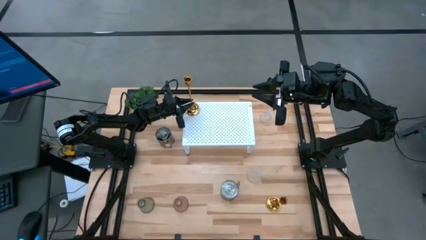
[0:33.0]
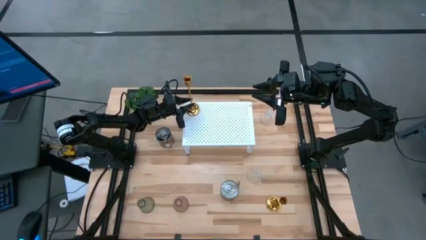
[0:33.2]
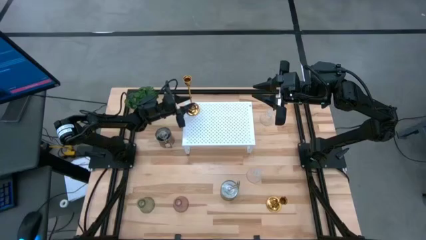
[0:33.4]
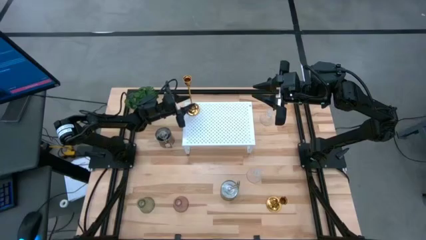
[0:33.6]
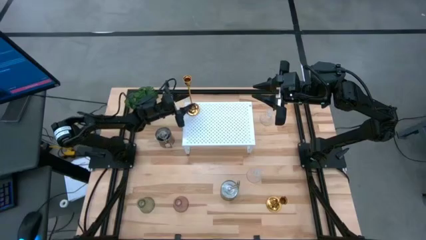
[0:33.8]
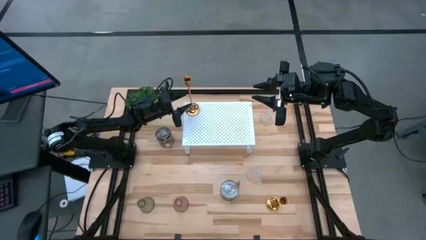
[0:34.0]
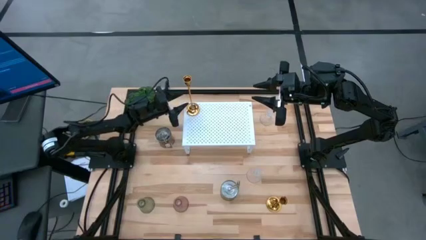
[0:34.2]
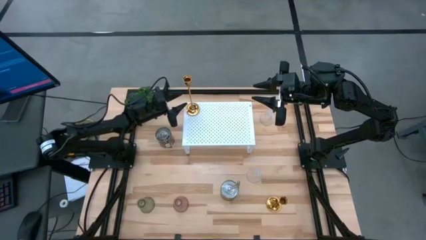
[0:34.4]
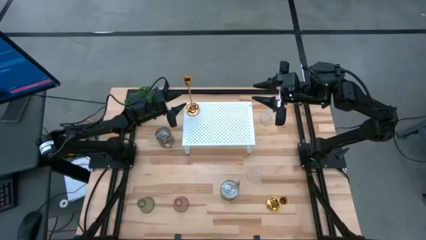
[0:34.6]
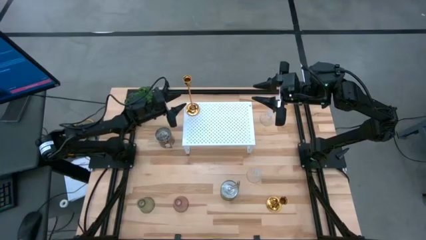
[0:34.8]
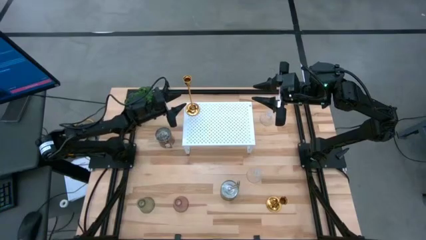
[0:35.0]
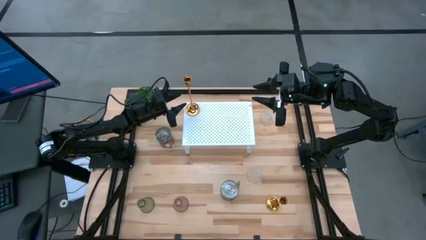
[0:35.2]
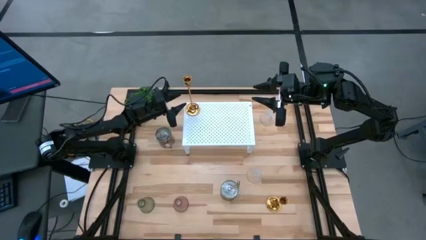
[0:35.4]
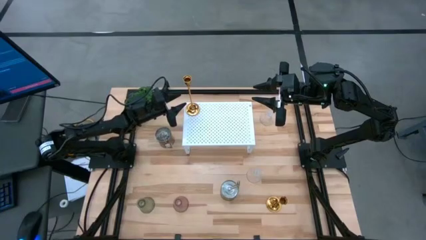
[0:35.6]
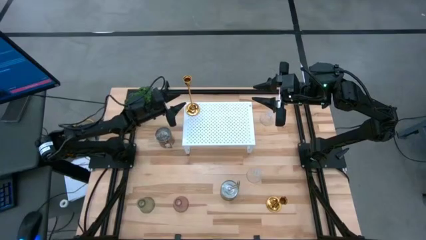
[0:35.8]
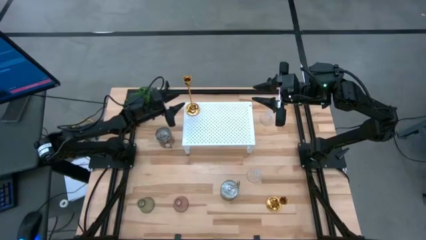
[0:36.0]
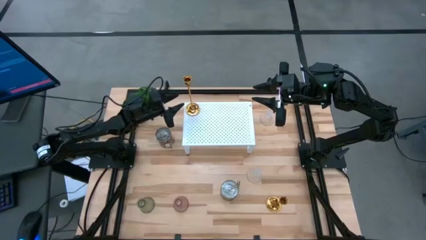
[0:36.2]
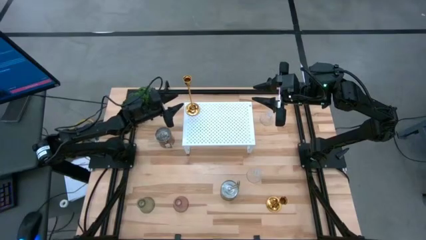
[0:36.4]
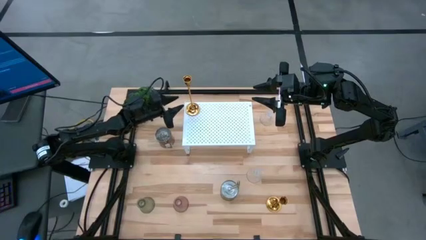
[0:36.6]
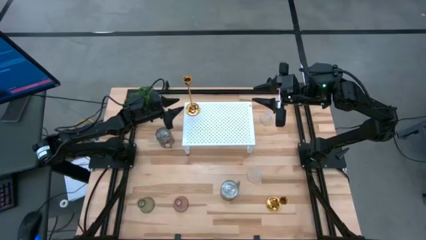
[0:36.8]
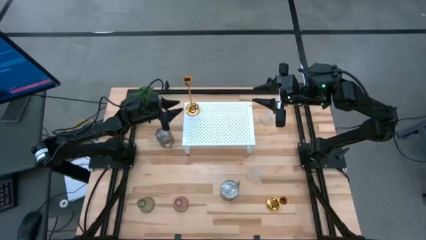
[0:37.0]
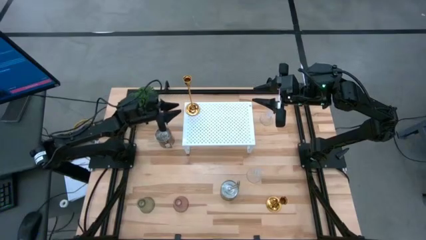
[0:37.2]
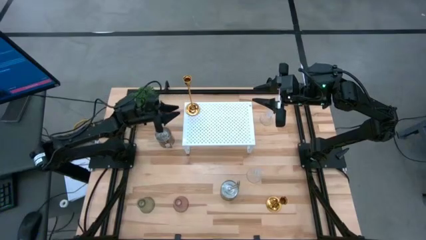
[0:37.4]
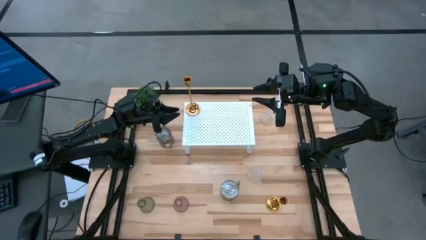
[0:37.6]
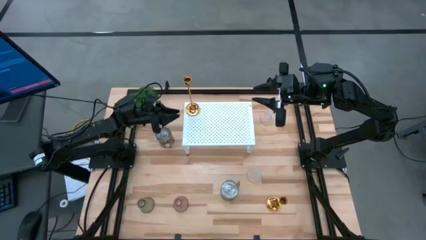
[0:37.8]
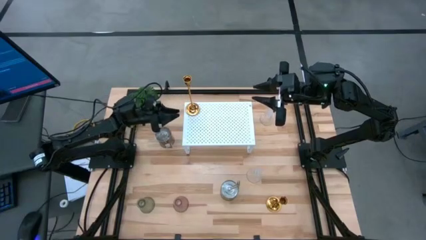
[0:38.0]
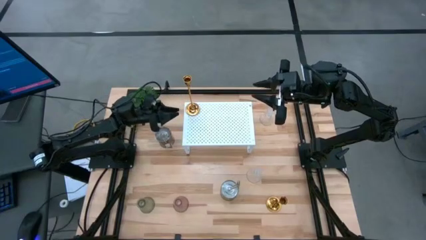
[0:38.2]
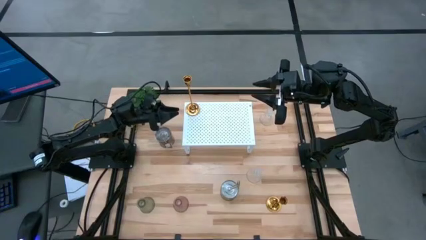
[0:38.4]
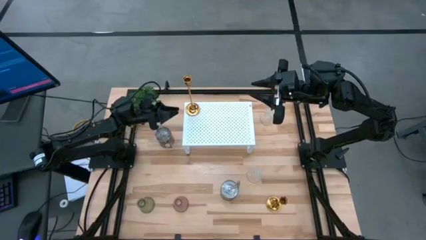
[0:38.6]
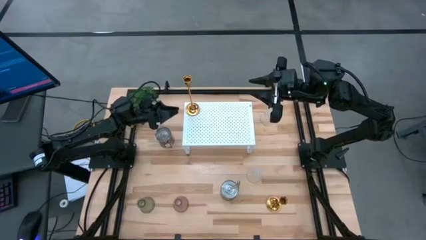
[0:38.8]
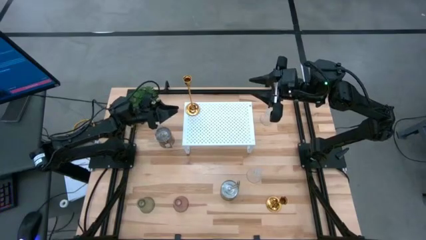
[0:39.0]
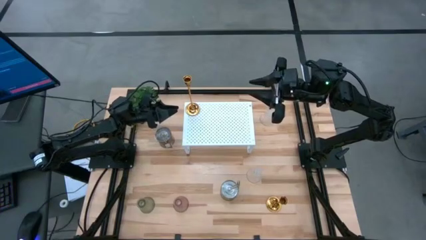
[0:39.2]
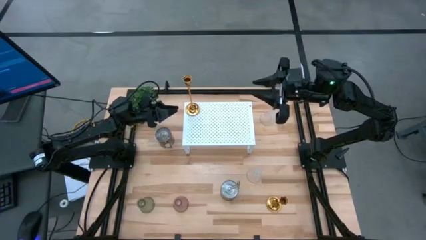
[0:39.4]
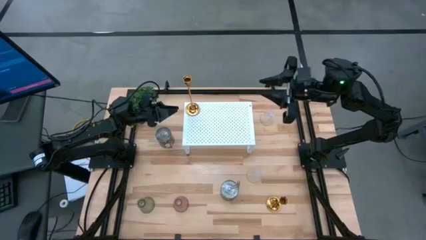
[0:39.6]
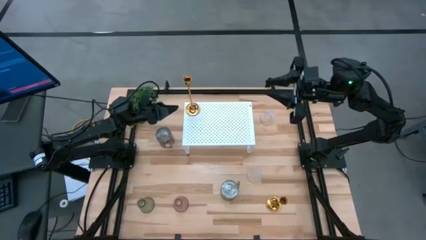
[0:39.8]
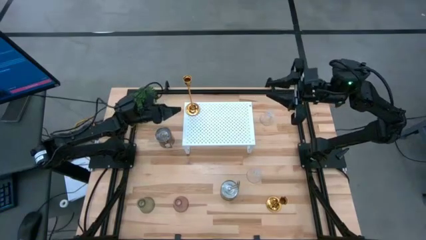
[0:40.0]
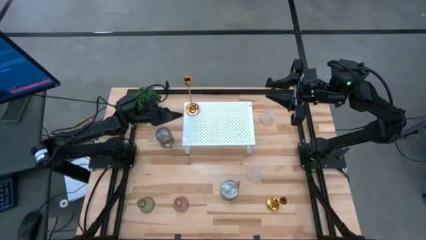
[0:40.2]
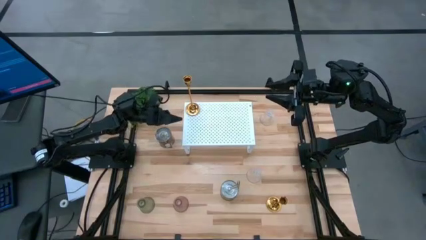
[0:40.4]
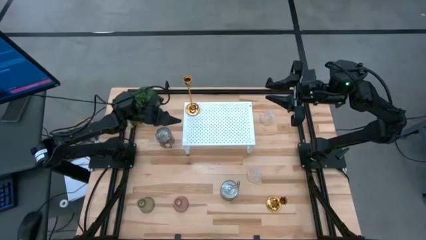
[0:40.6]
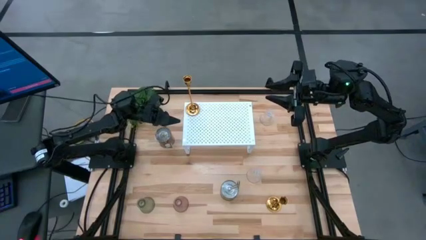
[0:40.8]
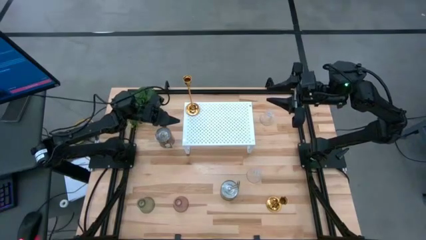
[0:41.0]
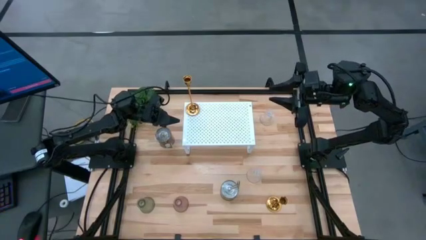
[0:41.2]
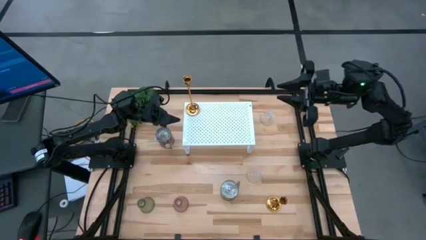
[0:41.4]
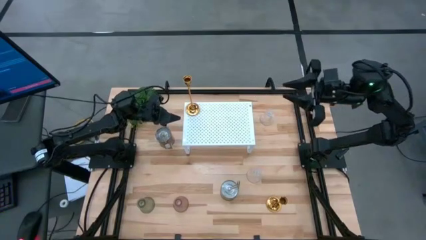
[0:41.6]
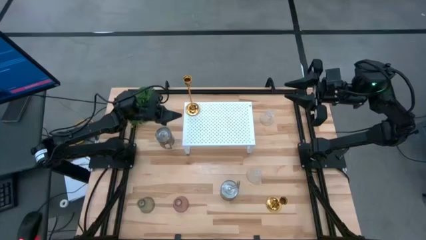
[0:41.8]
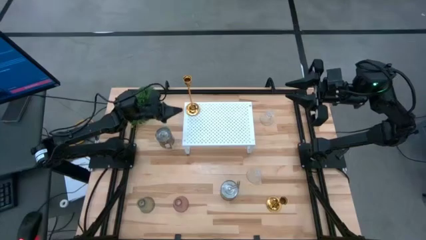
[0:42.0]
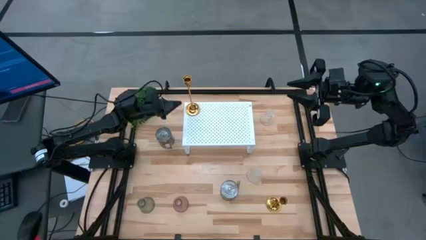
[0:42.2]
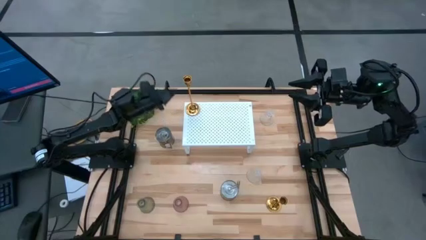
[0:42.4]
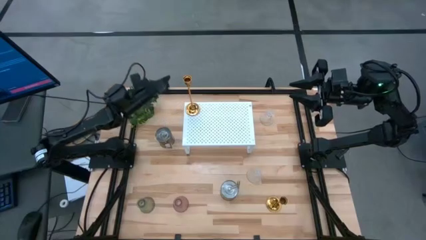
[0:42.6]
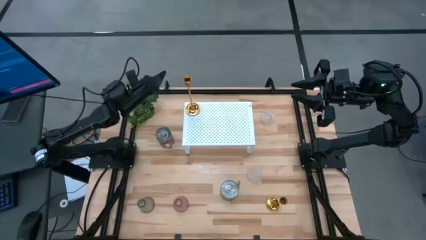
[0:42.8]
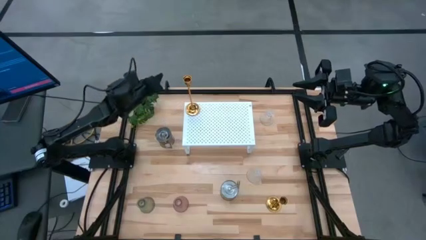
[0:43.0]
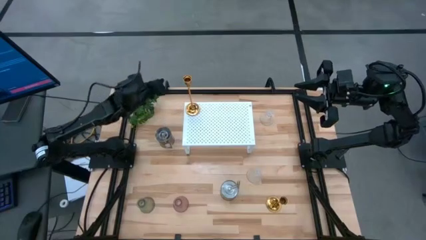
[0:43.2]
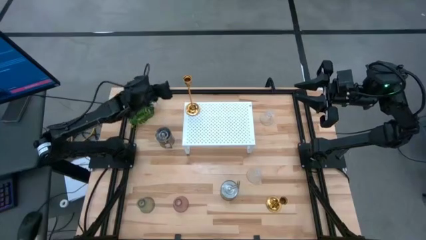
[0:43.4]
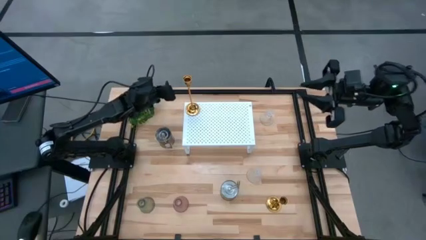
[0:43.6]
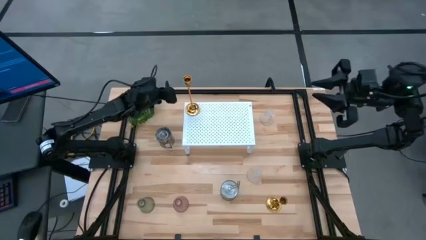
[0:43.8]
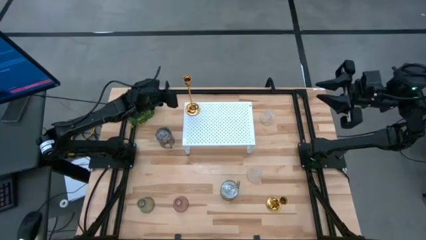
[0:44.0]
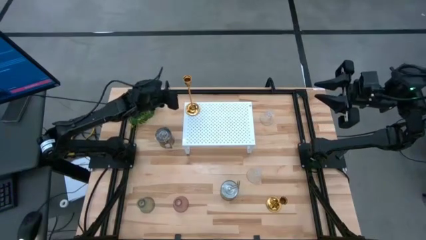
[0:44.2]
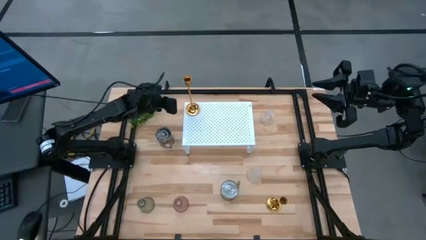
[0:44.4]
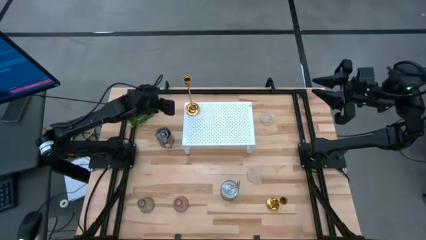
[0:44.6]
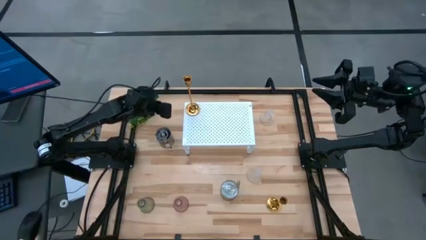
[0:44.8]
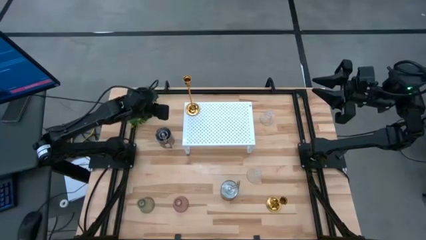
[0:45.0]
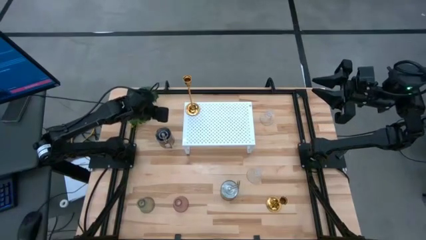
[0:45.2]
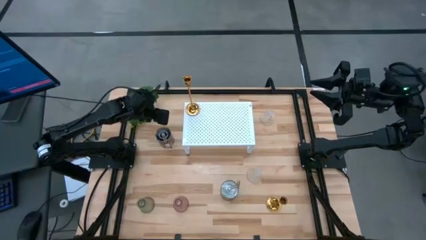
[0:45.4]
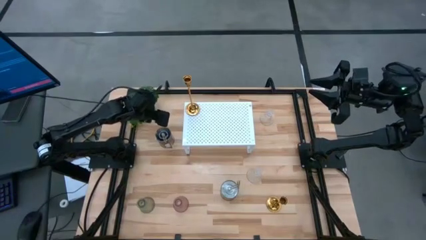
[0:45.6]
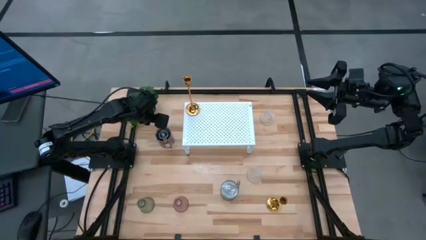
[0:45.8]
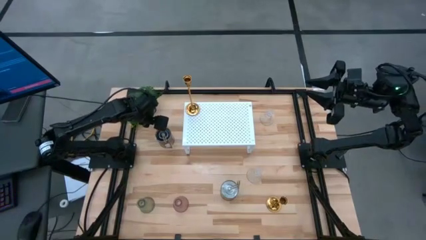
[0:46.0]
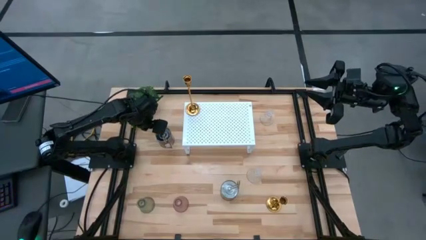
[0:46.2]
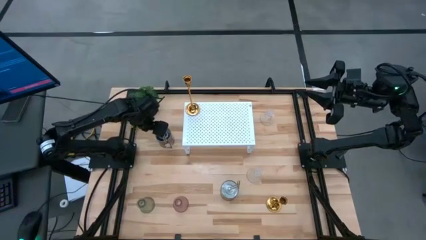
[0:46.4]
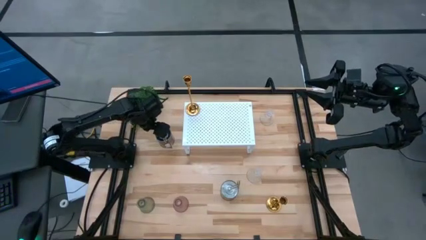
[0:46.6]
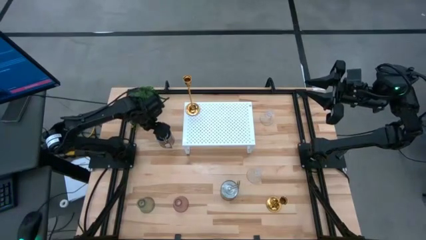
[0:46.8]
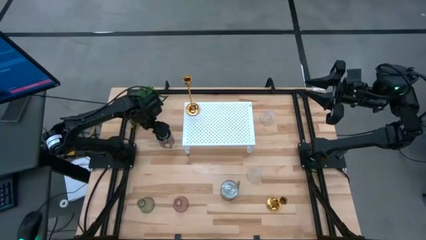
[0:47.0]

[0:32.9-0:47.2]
Task: Pick & Place candle stick holders
Put the top silver scented candle on the shelf
